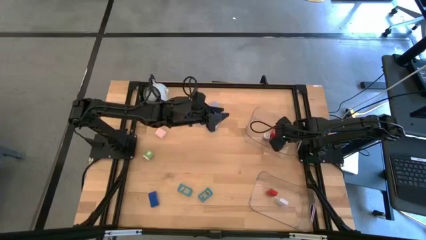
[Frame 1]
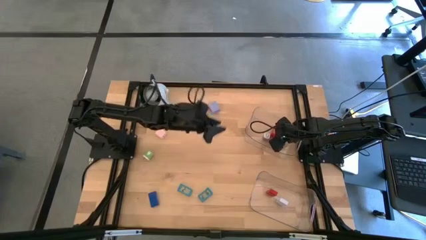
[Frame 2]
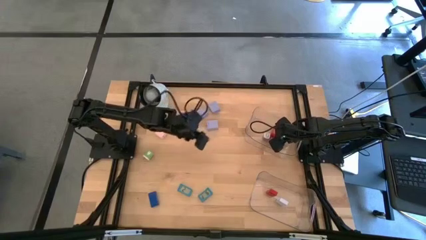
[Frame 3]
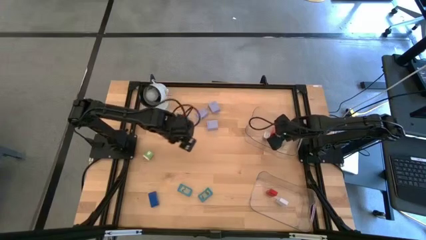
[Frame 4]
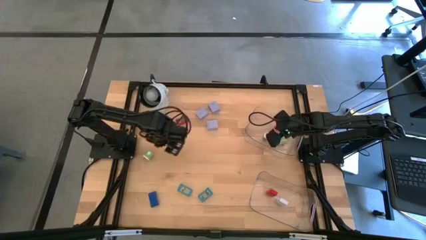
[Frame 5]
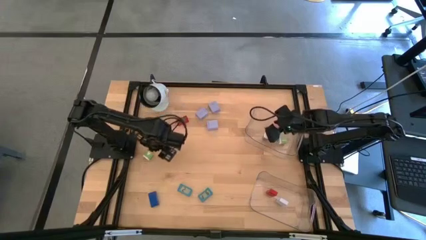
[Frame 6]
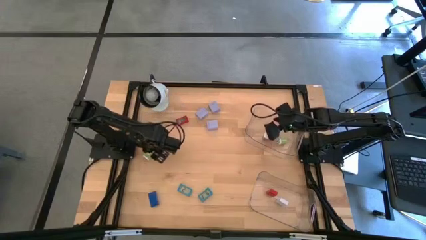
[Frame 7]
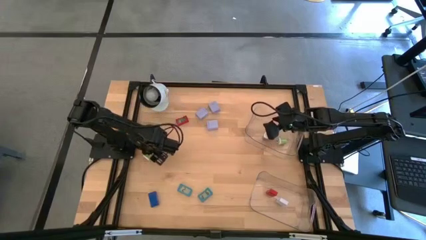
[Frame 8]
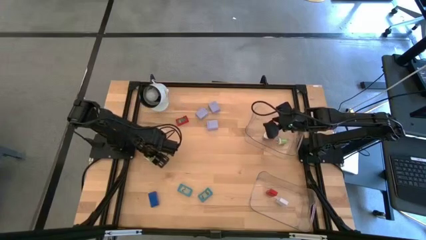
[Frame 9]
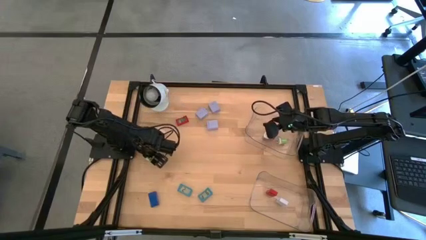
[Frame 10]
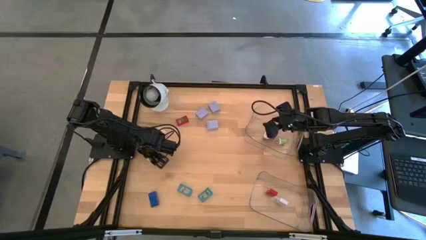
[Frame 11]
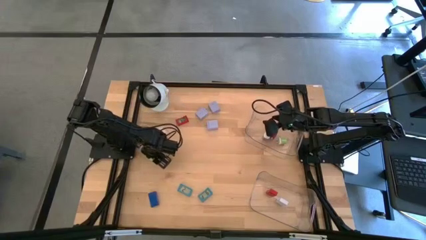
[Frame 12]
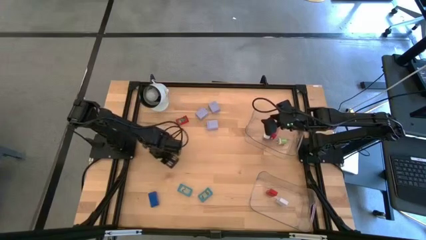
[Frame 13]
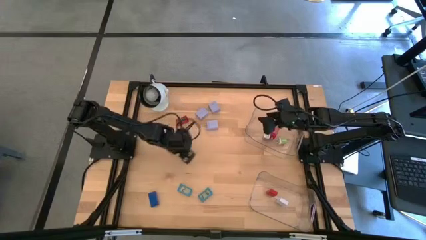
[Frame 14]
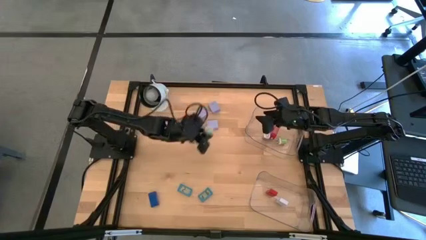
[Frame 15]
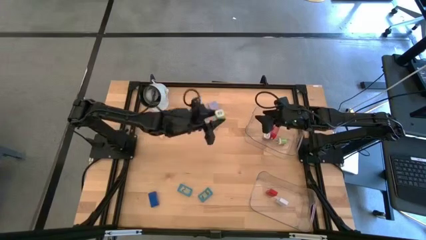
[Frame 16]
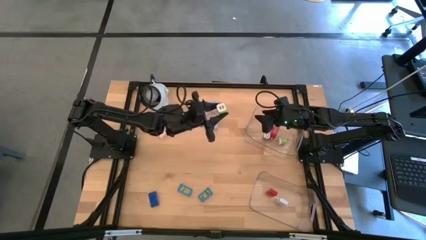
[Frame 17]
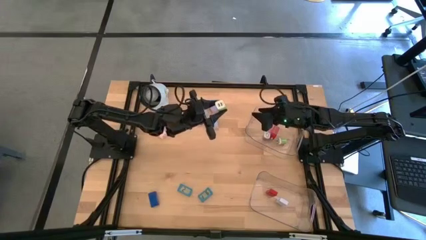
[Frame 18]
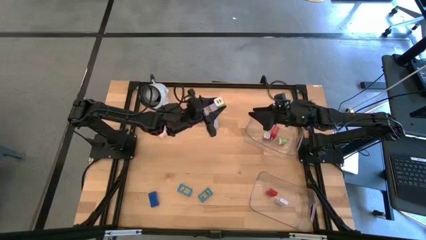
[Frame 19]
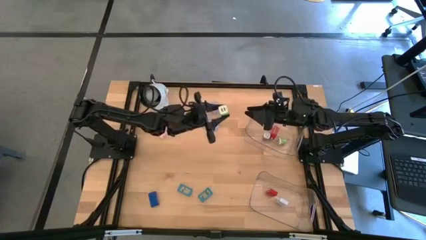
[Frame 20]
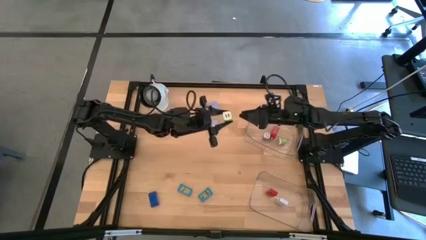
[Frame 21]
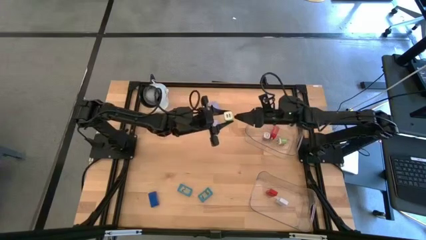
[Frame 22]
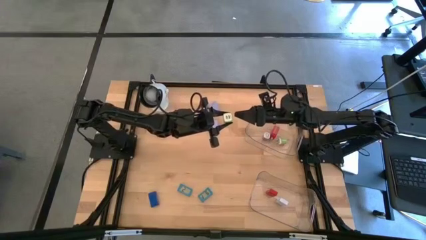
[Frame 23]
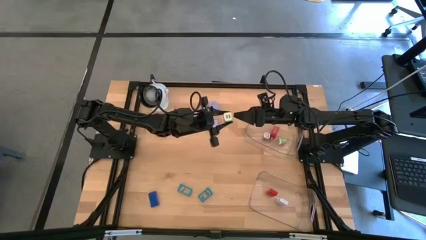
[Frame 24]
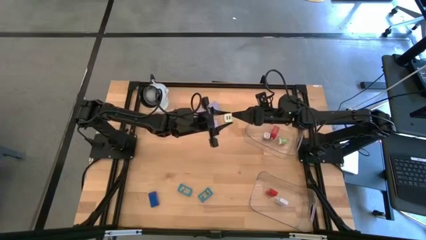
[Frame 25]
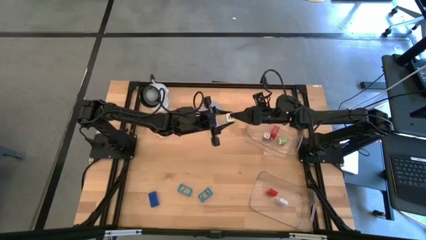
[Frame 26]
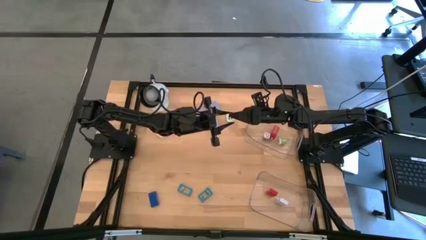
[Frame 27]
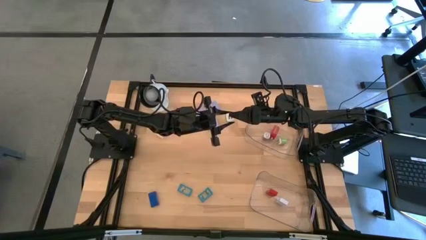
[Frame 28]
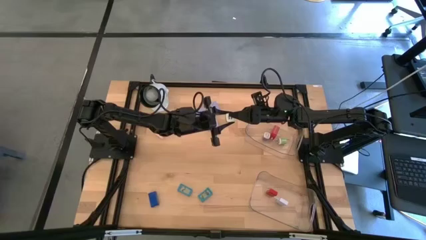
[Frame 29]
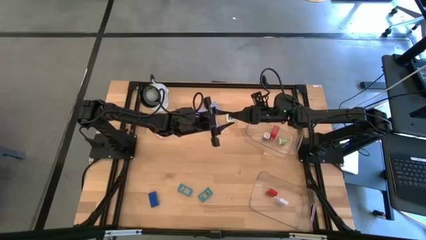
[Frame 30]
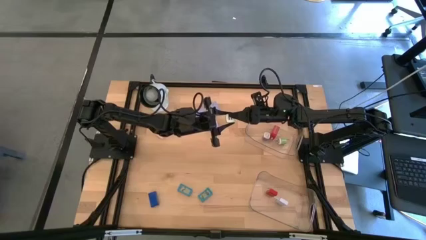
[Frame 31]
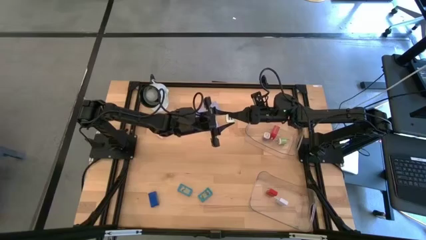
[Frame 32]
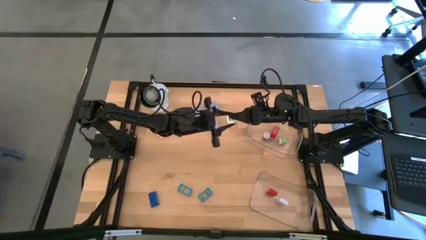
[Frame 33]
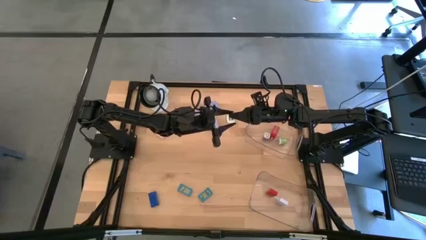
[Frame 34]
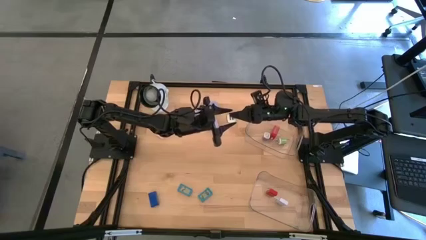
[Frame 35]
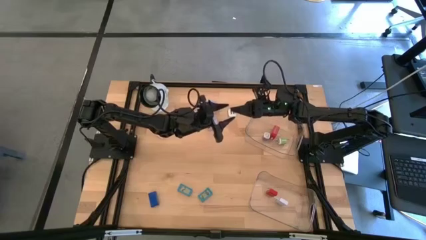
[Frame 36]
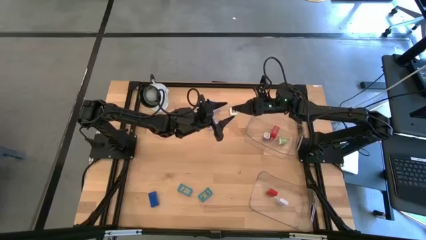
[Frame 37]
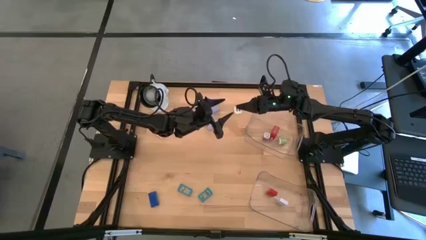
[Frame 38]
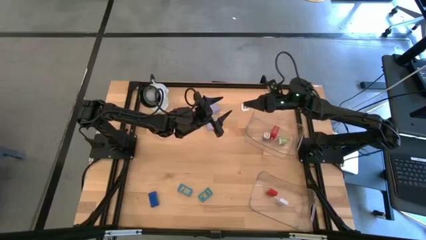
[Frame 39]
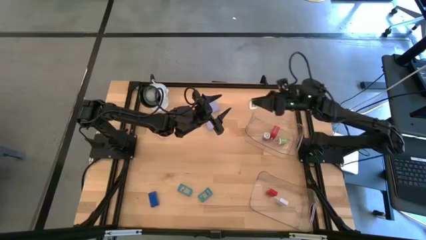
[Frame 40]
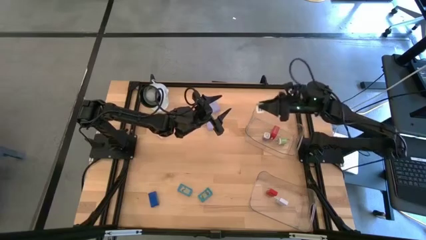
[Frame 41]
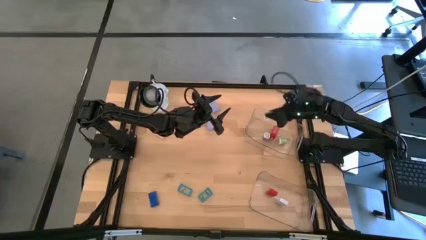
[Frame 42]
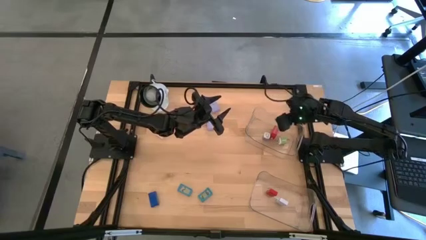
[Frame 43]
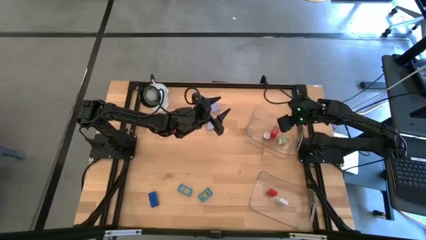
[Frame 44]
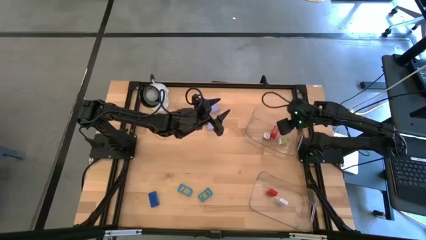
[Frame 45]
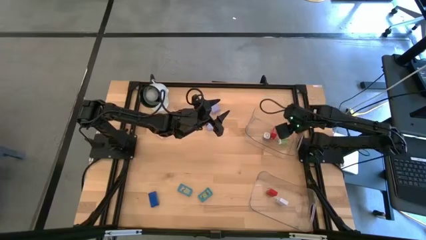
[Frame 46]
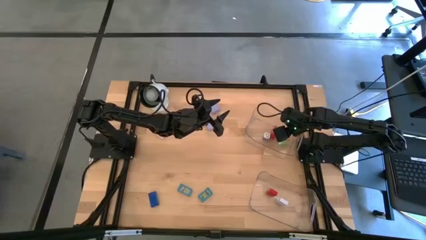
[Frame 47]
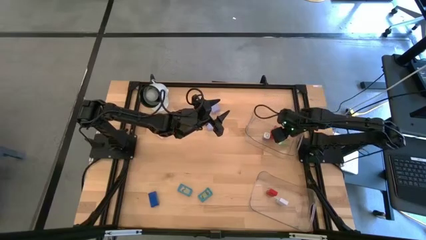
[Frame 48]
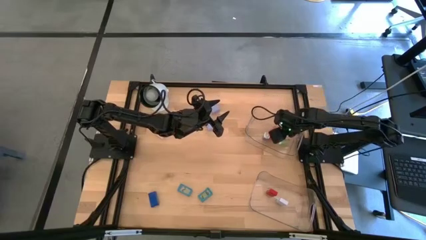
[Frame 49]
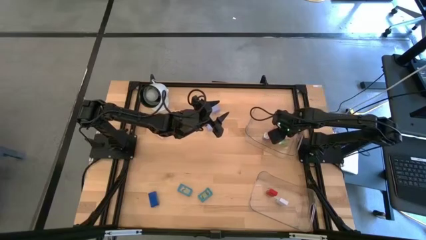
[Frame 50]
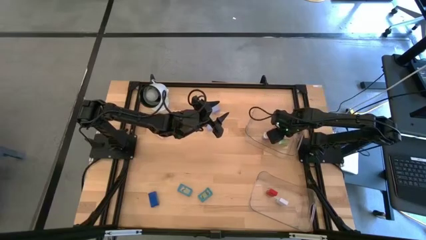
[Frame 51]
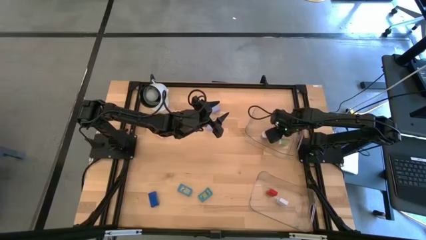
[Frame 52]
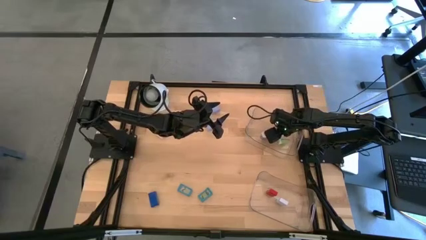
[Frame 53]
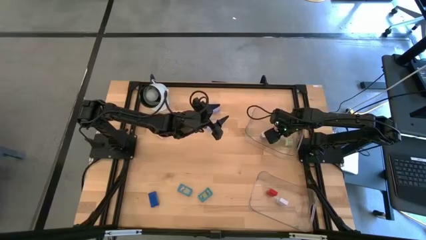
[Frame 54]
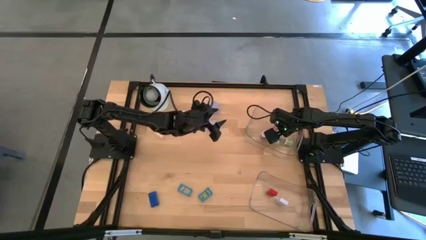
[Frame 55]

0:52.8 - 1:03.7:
Task: Pick & Place Office items
Put the green charger adapter into the top transparent bin

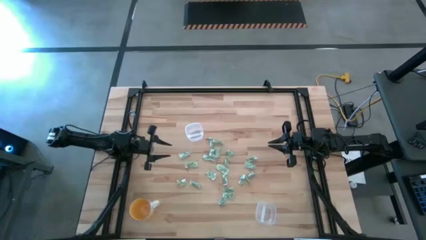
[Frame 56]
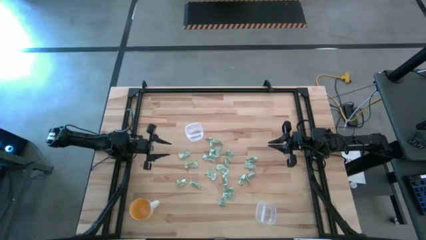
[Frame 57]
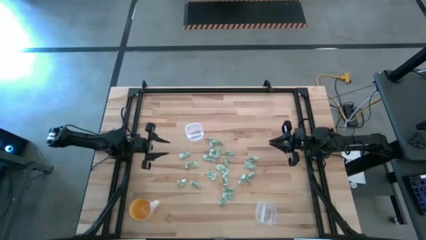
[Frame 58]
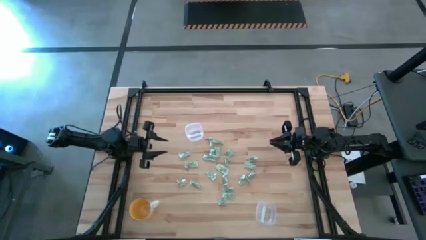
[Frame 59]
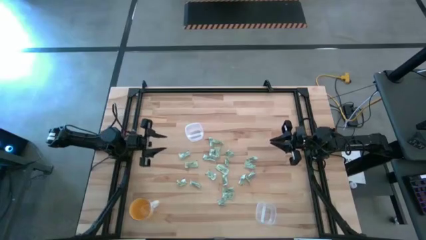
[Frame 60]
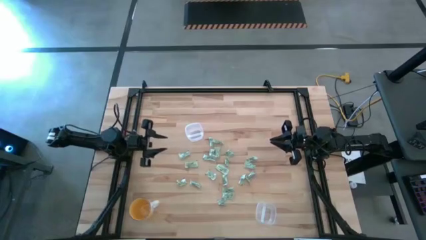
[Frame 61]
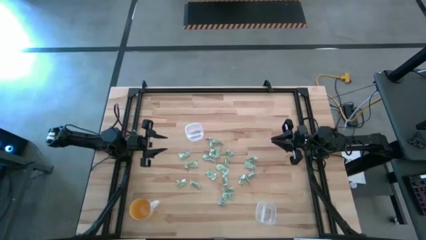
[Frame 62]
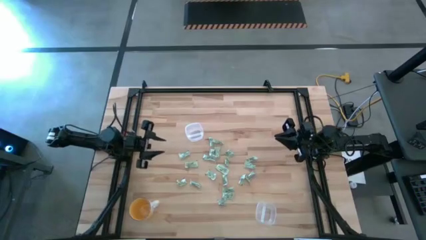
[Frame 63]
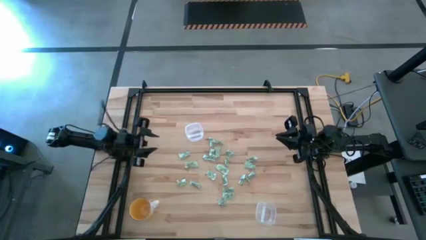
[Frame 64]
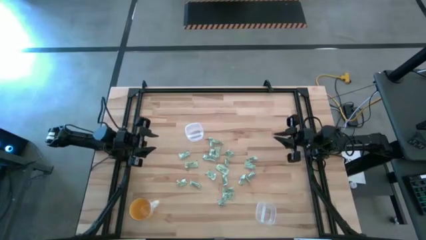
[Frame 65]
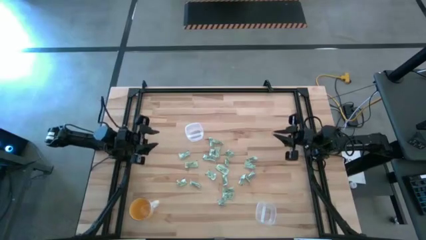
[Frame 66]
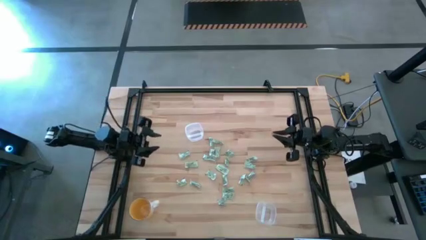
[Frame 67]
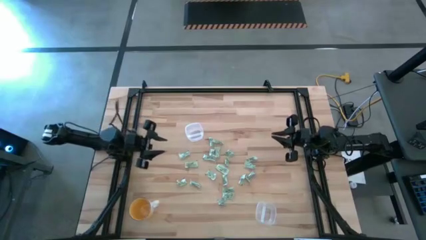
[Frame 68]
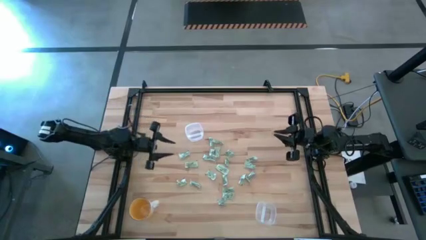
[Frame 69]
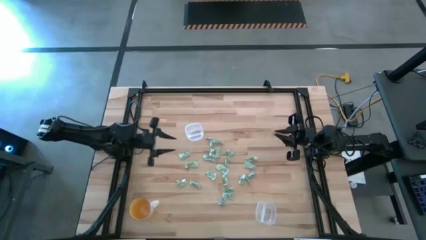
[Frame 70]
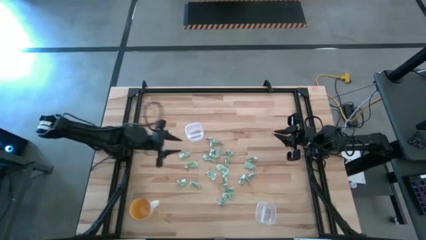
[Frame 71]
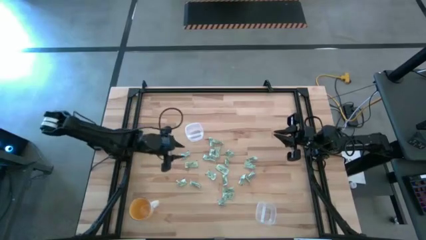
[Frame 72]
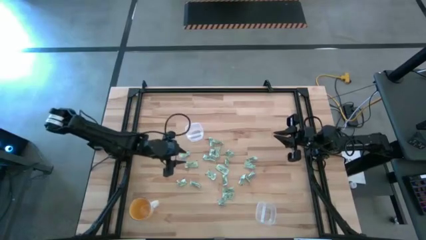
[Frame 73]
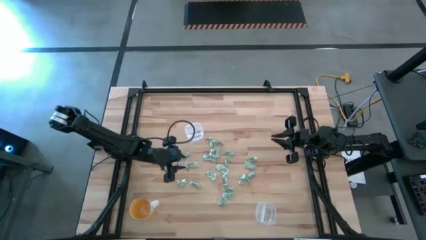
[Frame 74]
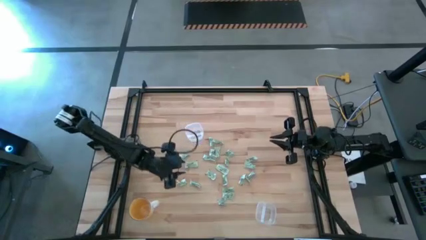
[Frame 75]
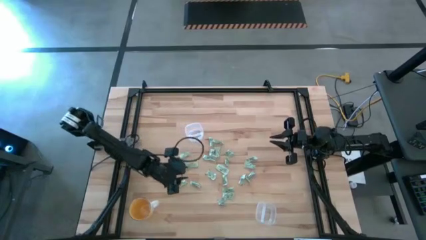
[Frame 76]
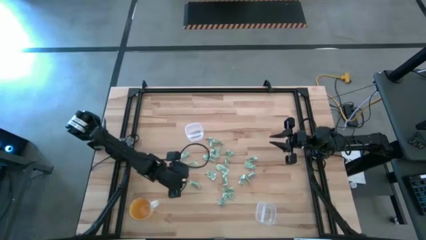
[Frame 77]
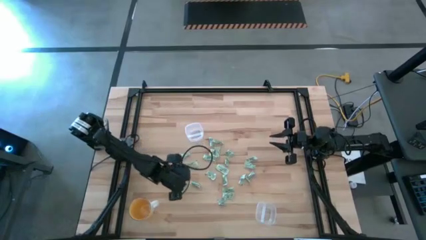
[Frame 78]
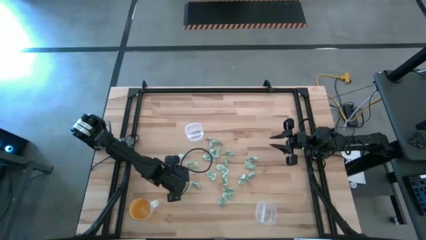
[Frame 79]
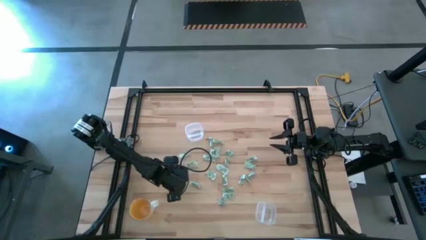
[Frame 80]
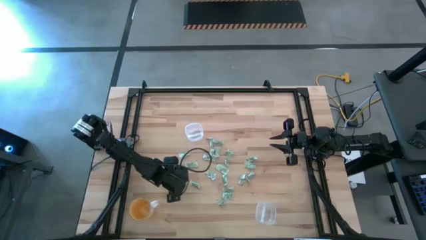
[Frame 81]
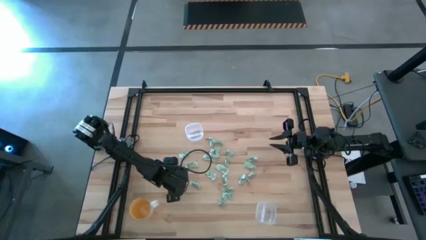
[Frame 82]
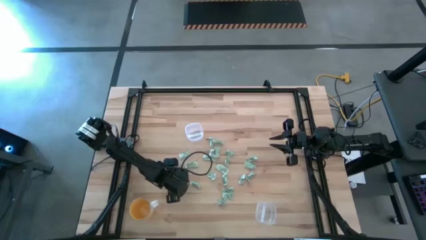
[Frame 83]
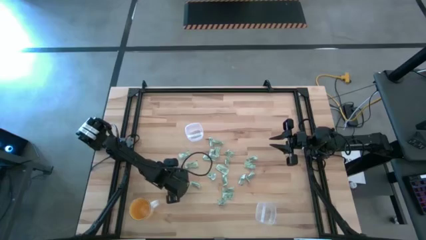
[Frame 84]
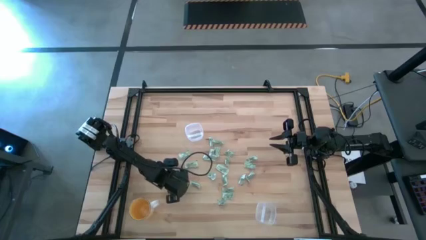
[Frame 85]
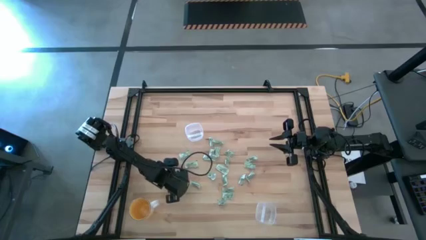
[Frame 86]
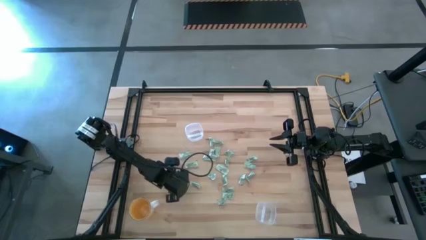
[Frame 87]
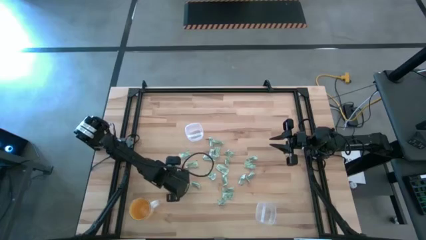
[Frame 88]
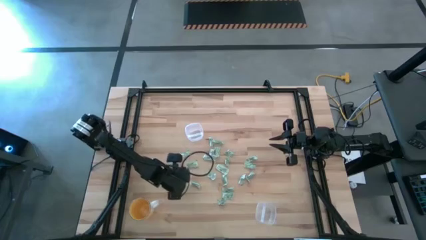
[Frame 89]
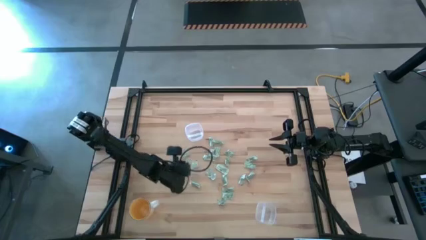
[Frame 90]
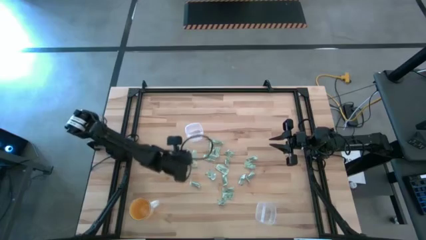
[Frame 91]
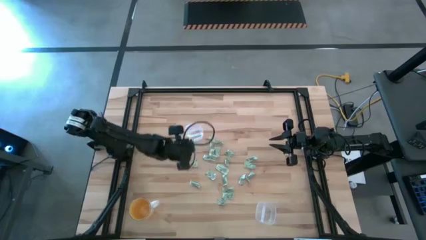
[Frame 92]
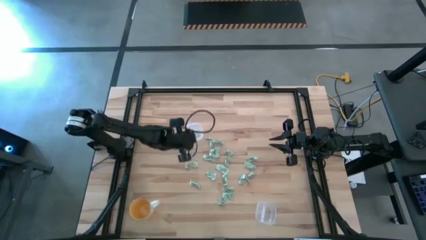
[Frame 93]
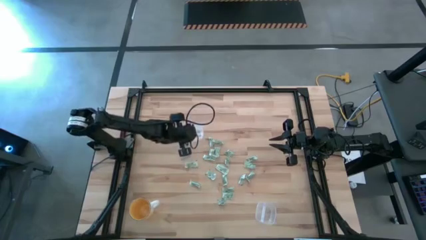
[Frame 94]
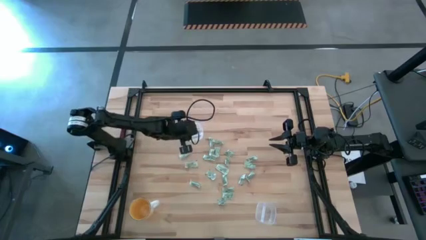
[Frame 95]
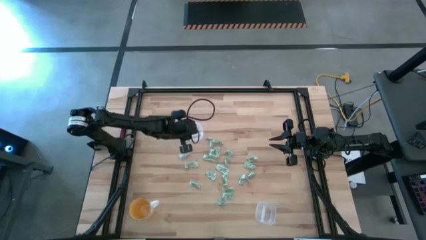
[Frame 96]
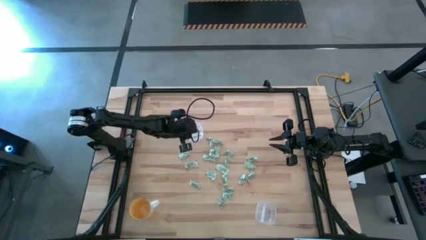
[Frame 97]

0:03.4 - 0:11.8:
Task: Pick and place Stevia / Truvia into bins
Put the stevia packet into the top transparent container
